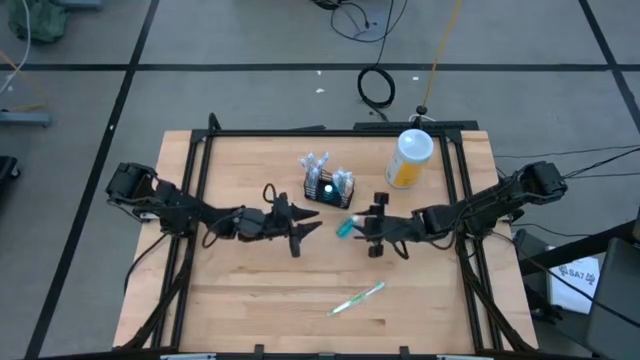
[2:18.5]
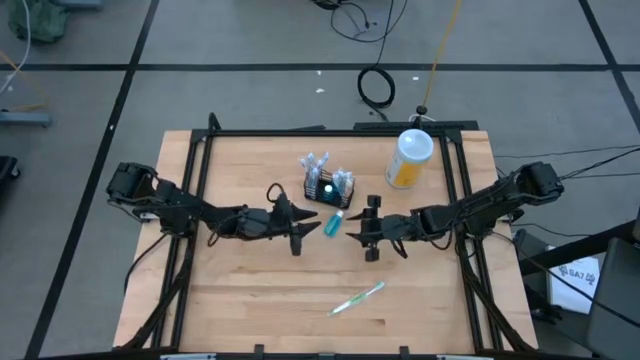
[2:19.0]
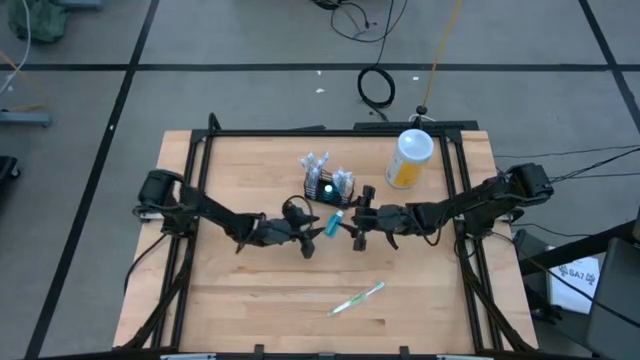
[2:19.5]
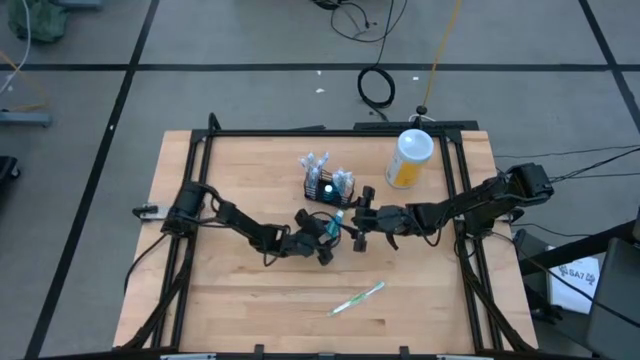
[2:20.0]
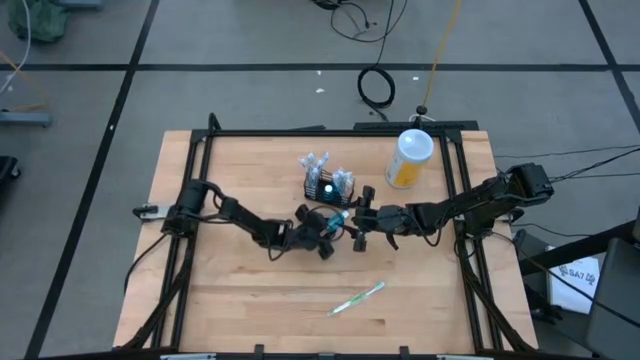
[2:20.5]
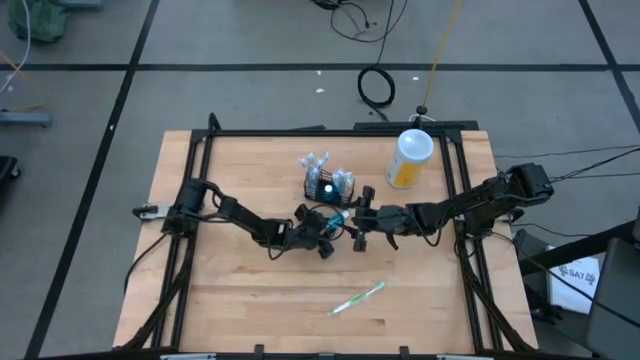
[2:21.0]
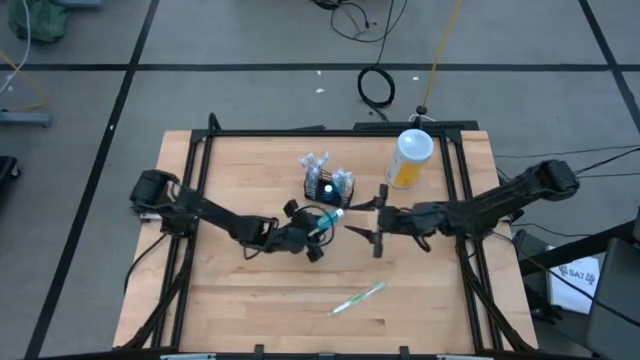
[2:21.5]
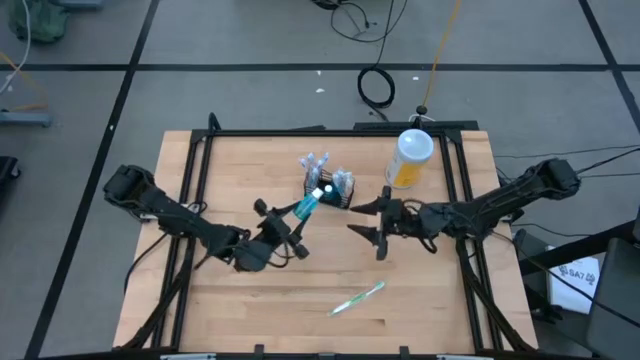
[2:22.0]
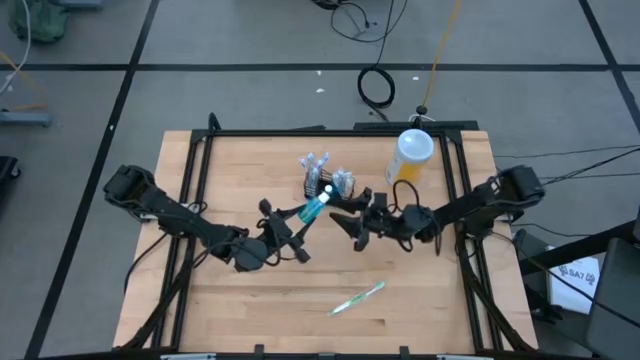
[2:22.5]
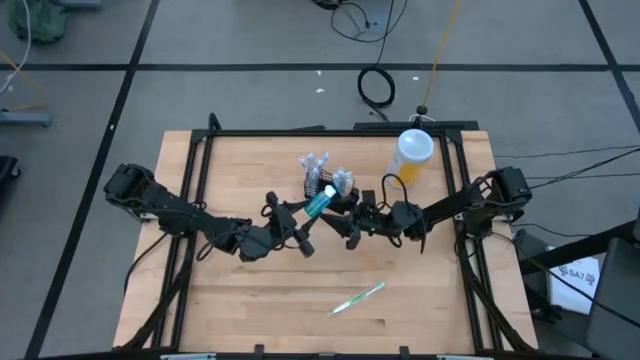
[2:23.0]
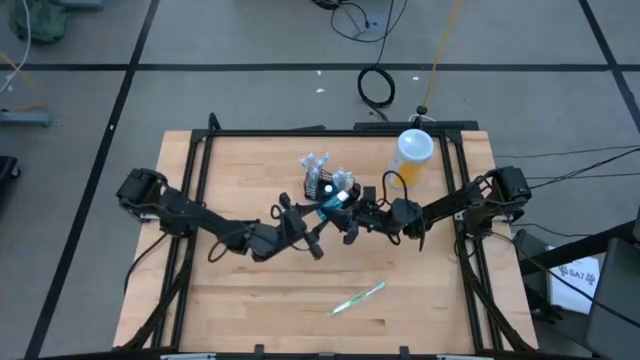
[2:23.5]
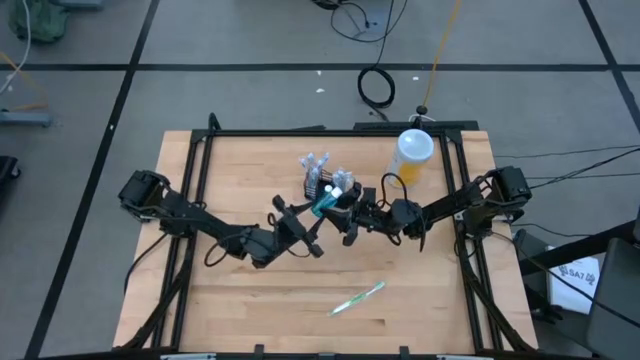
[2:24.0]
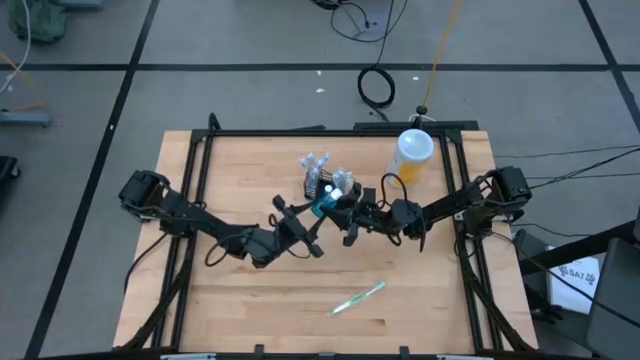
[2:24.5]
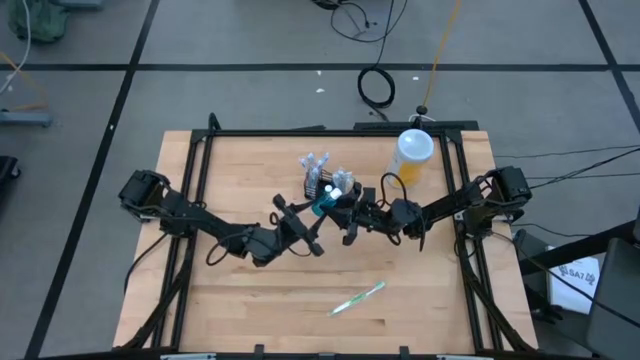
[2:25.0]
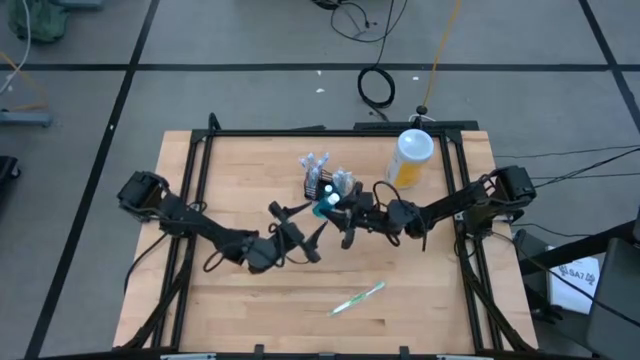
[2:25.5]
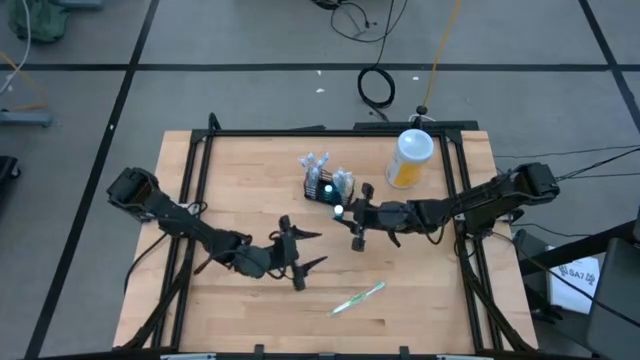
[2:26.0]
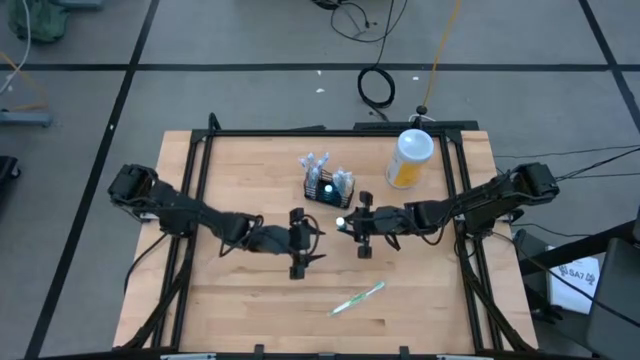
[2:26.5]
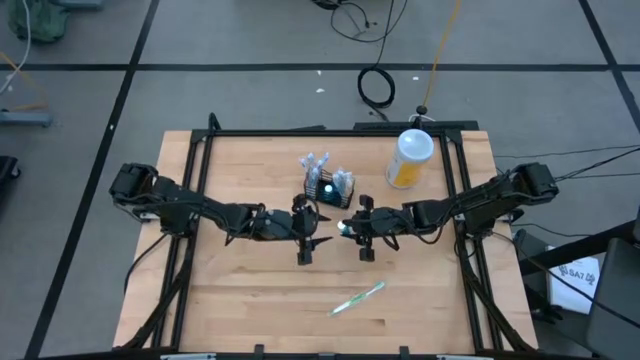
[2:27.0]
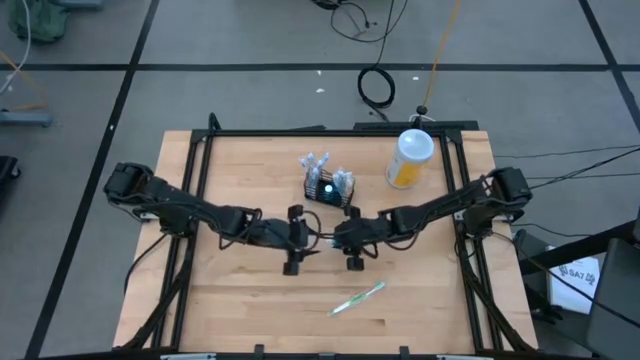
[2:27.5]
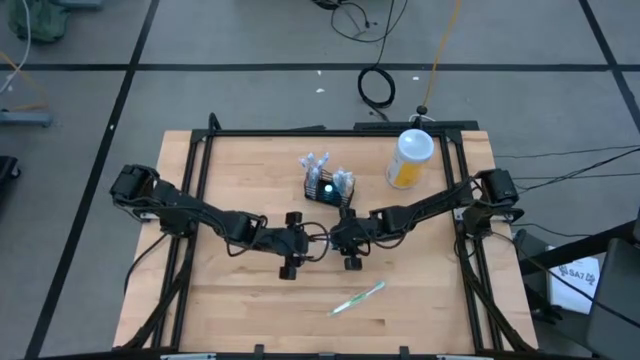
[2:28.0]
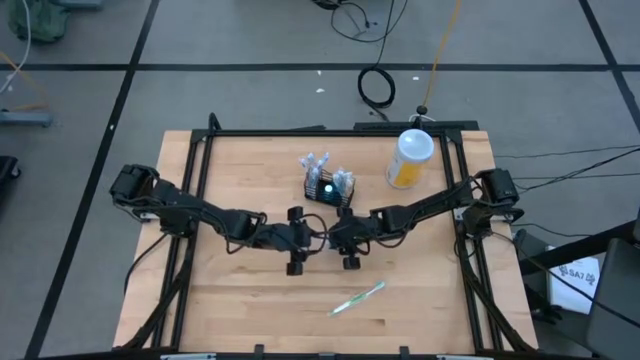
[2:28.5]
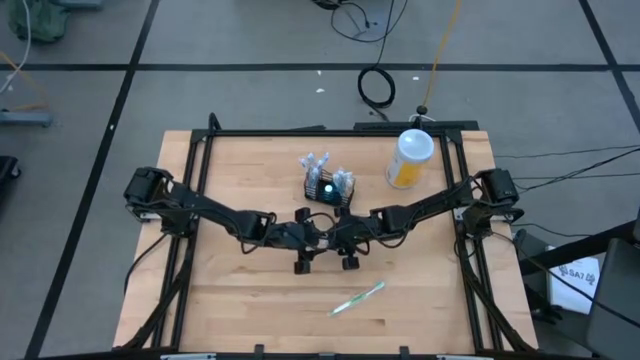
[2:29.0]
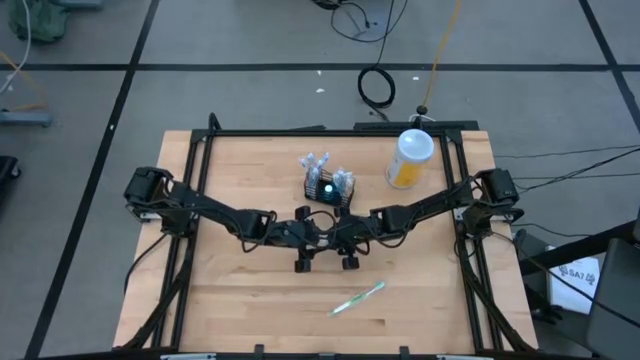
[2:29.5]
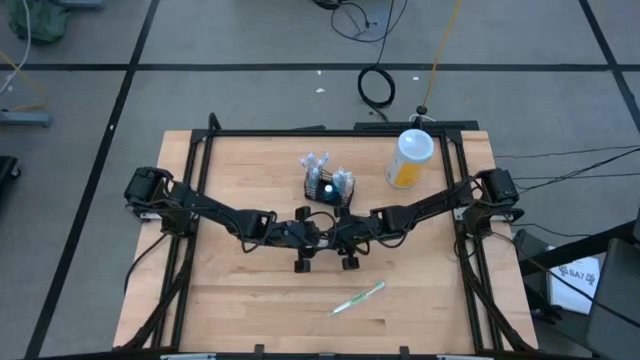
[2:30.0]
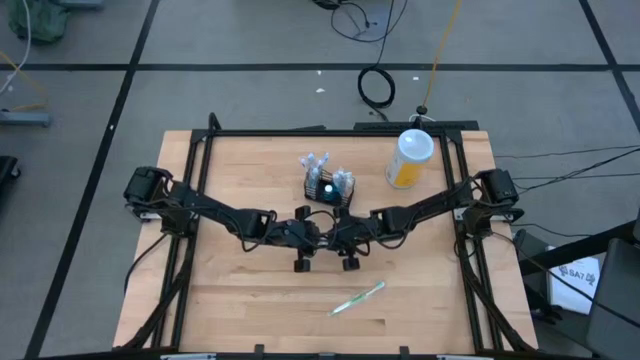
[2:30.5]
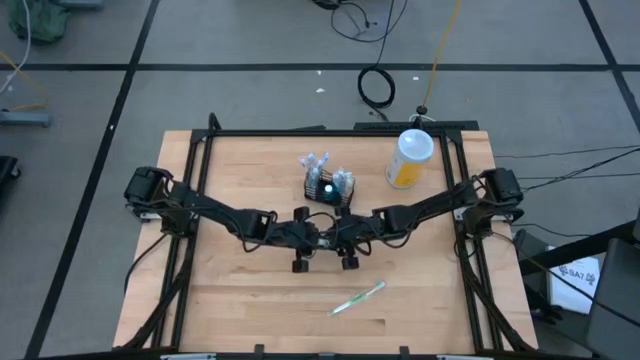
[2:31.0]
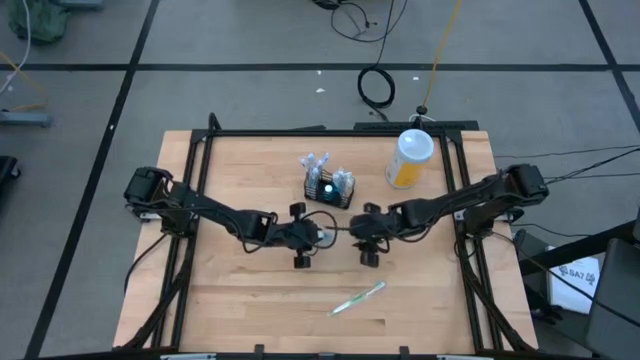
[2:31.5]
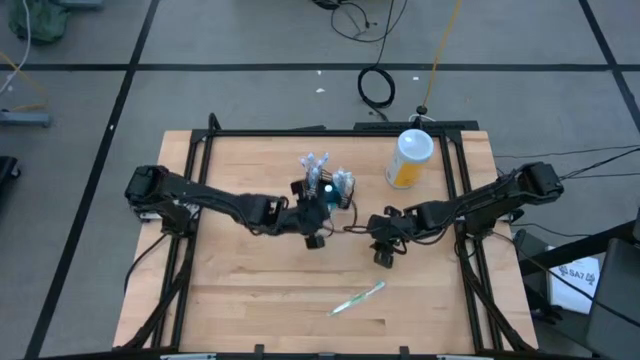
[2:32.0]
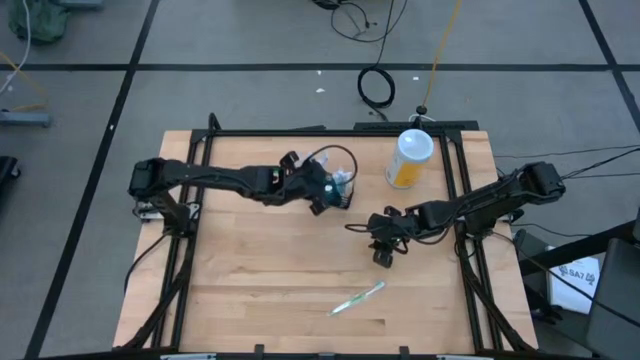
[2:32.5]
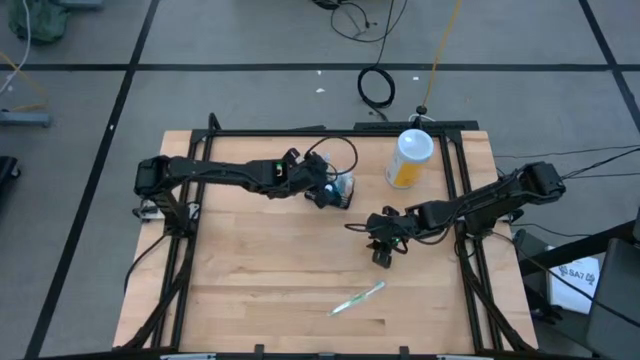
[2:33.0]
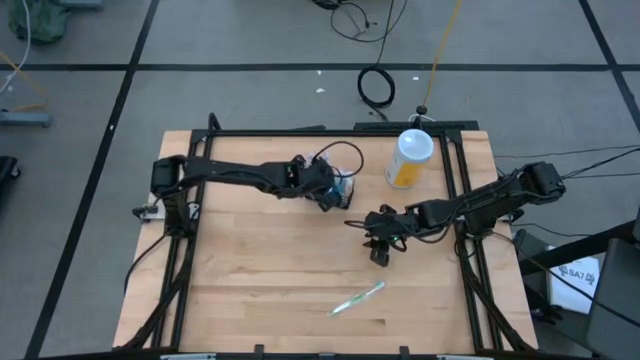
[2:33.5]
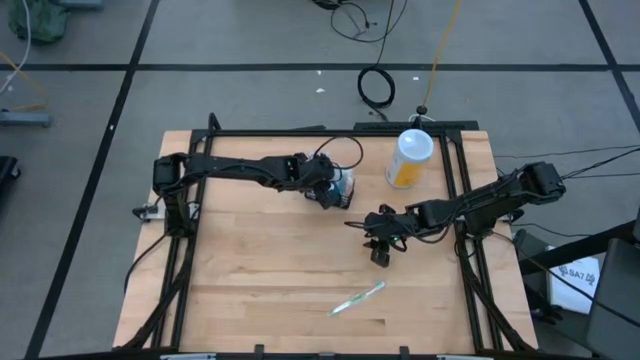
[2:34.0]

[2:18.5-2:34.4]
Task: Pick & Place toothbrushing station
Put the blue mouthwash into the black wire organizer

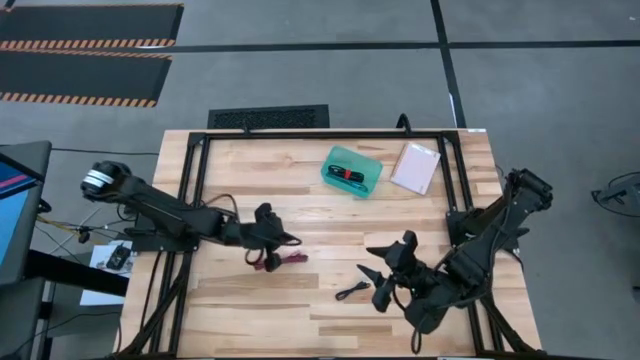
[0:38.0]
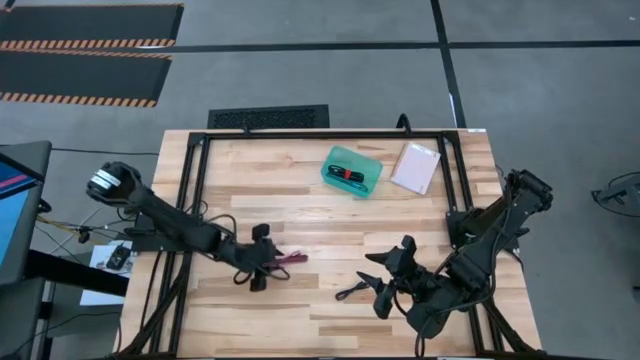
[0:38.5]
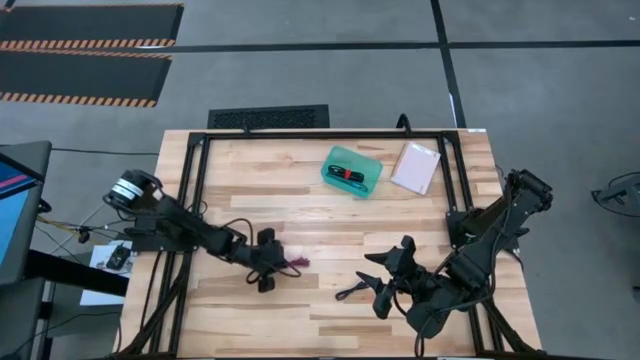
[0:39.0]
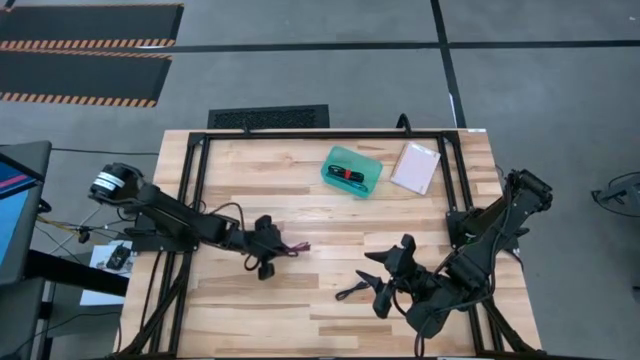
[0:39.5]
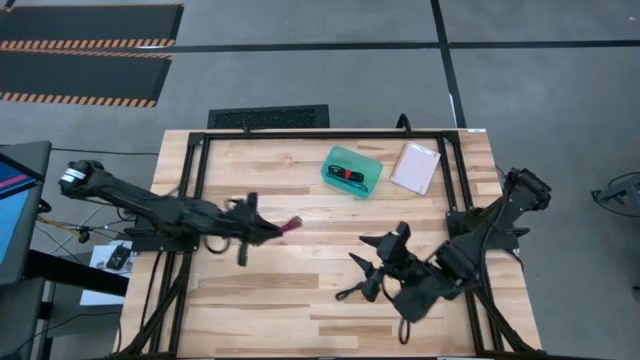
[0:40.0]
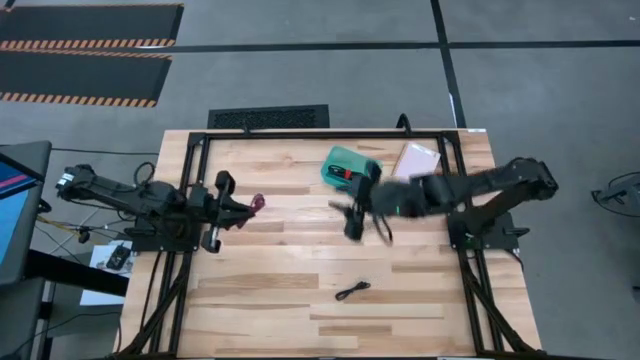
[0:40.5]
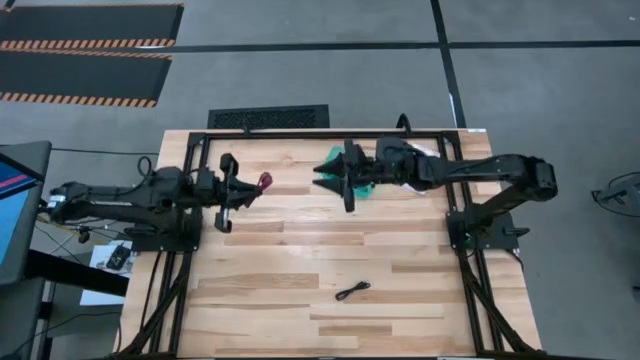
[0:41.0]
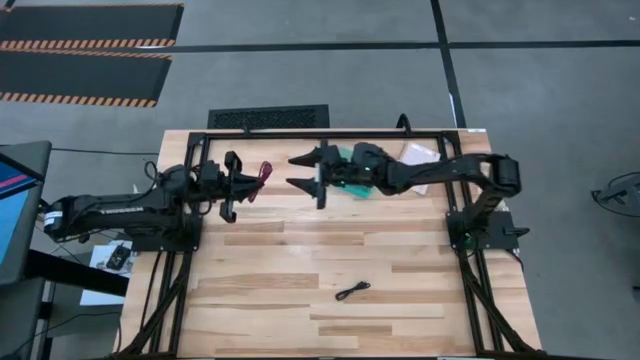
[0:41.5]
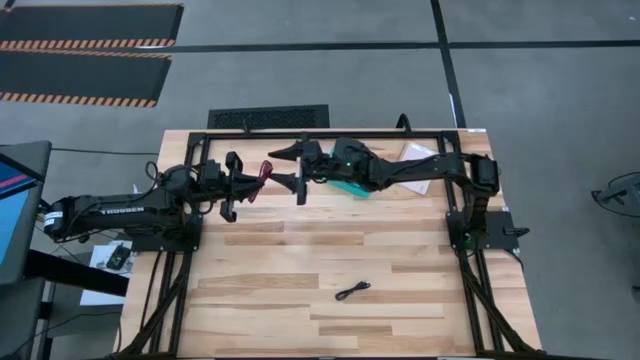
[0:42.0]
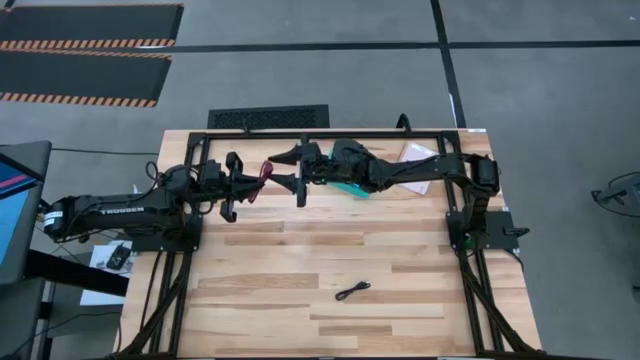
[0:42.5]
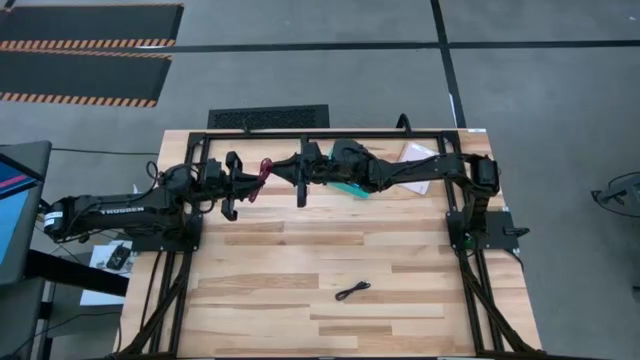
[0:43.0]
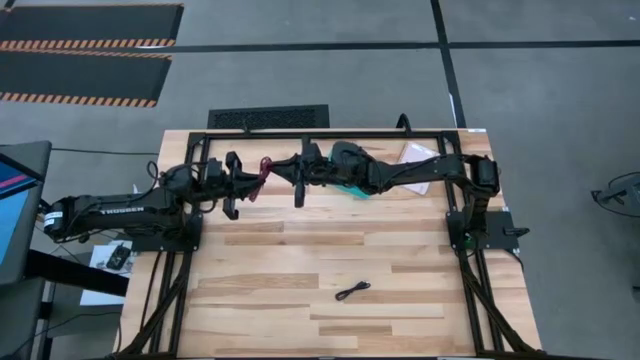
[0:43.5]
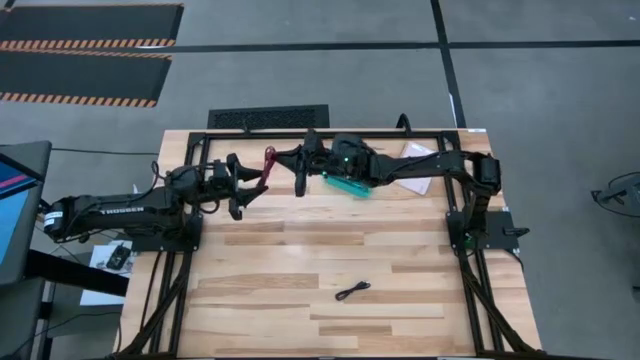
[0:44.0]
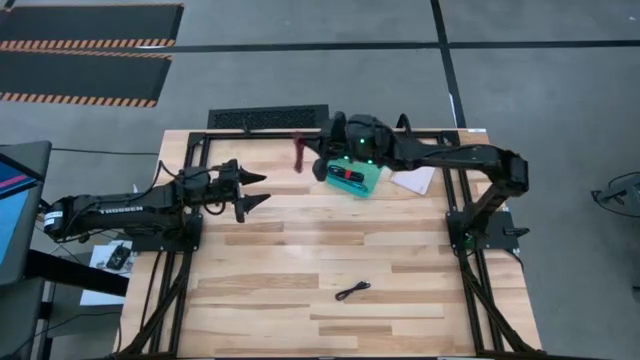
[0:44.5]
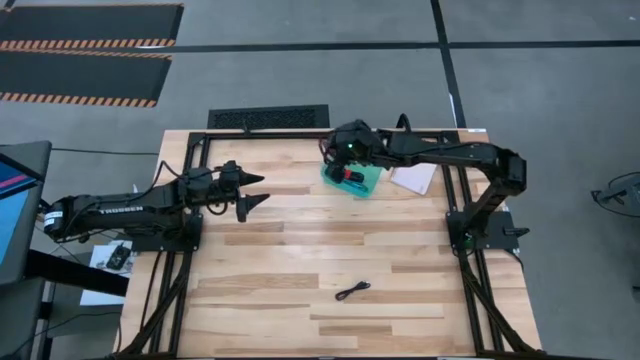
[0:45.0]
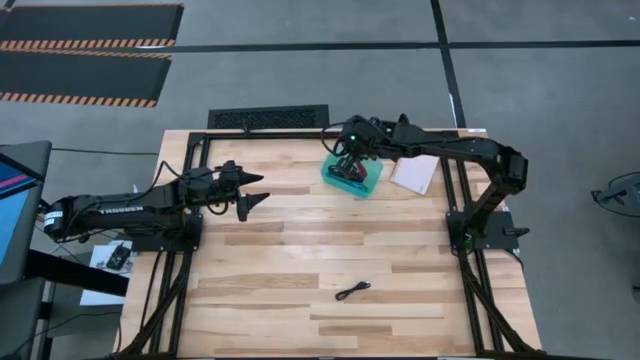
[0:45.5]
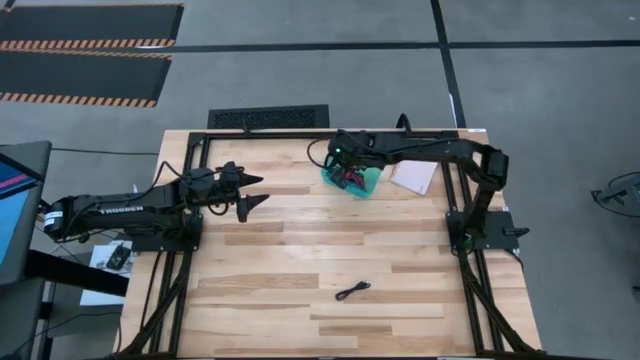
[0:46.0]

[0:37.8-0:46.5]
Task: Pick and place USB-C Cables
Put the pink charger cable into the light blue bin
